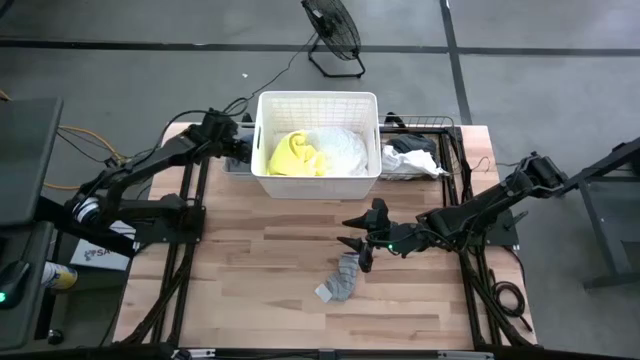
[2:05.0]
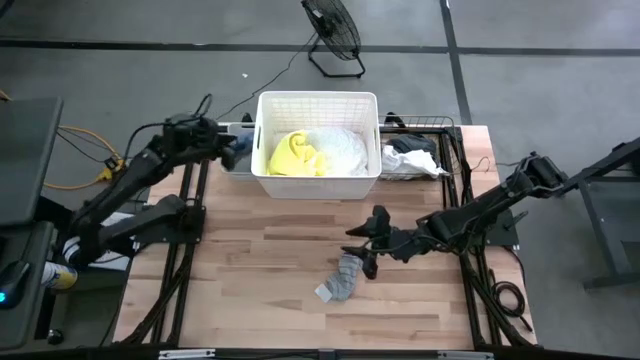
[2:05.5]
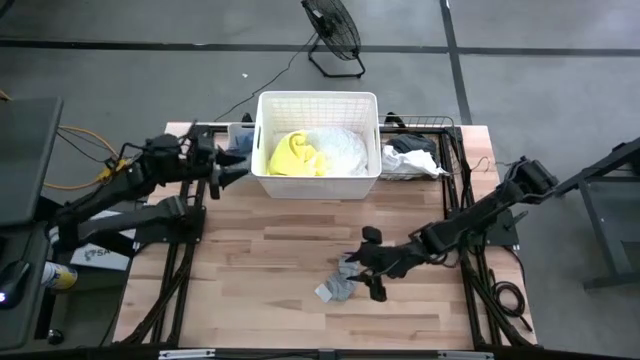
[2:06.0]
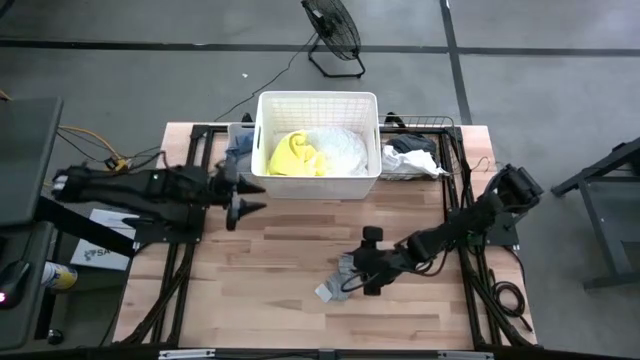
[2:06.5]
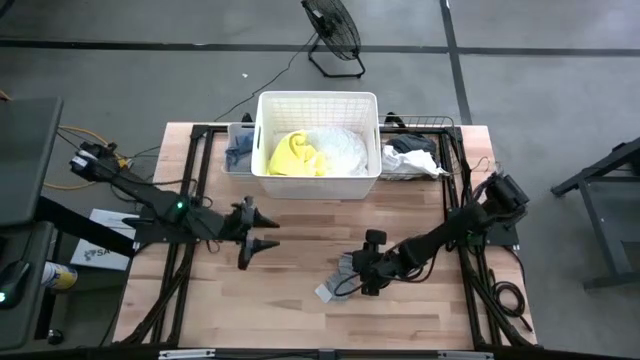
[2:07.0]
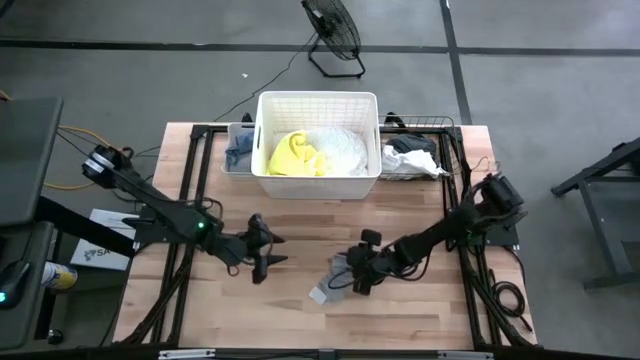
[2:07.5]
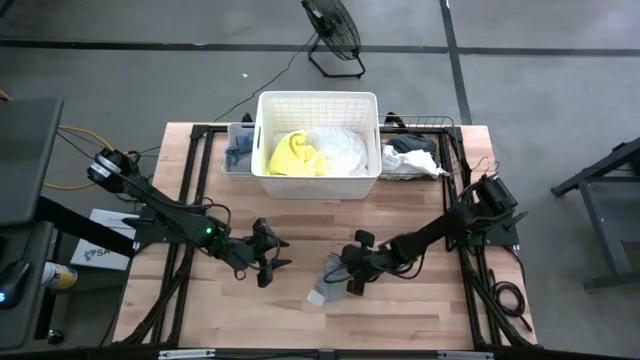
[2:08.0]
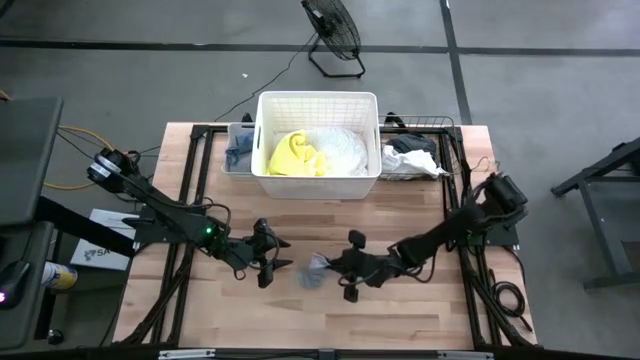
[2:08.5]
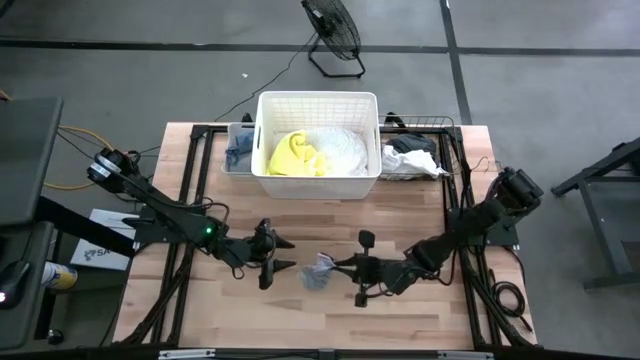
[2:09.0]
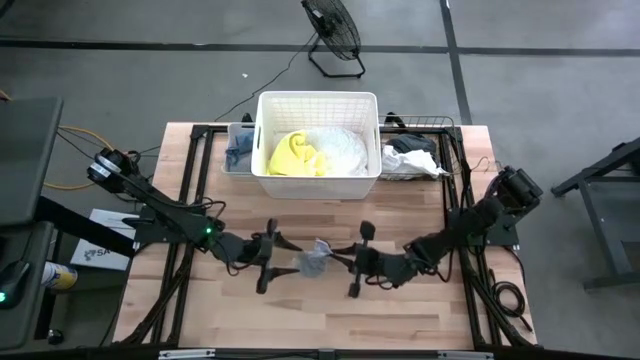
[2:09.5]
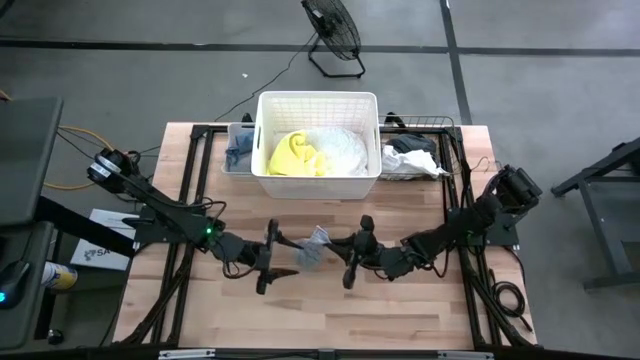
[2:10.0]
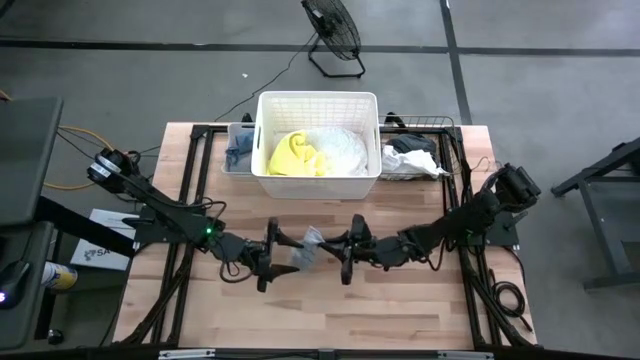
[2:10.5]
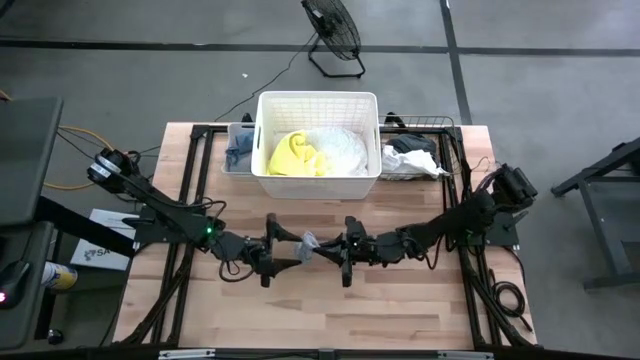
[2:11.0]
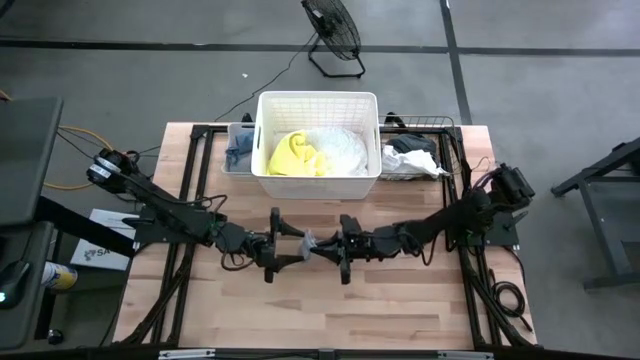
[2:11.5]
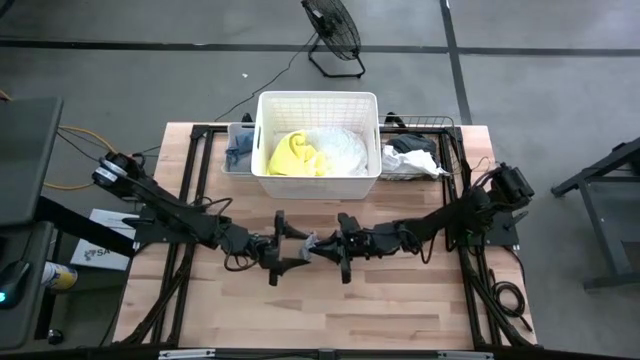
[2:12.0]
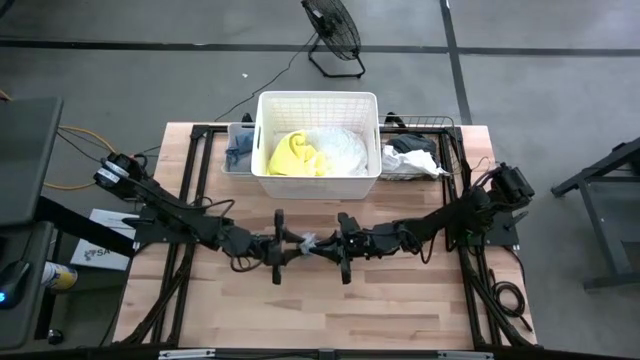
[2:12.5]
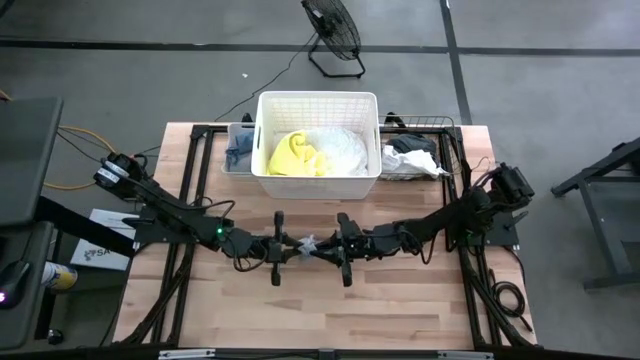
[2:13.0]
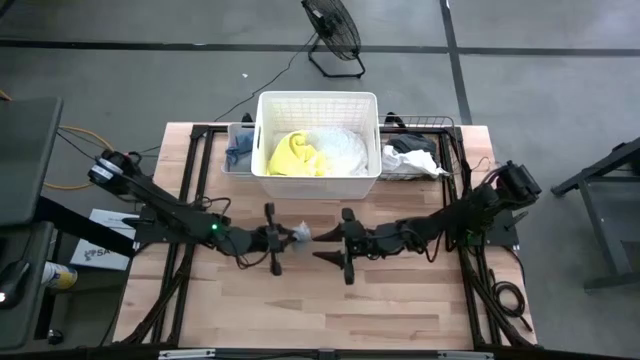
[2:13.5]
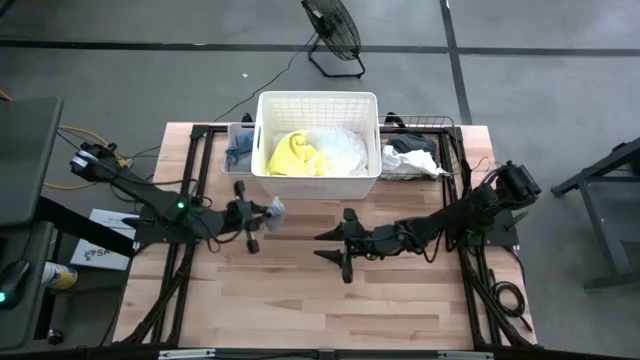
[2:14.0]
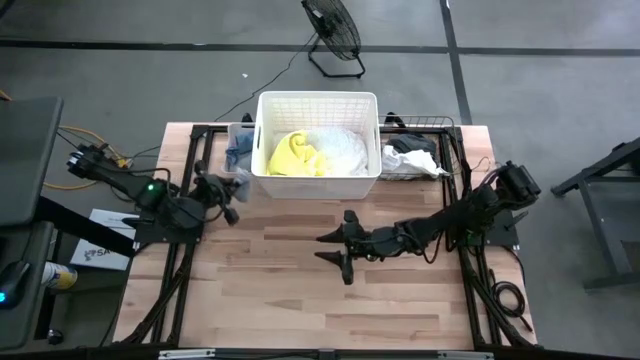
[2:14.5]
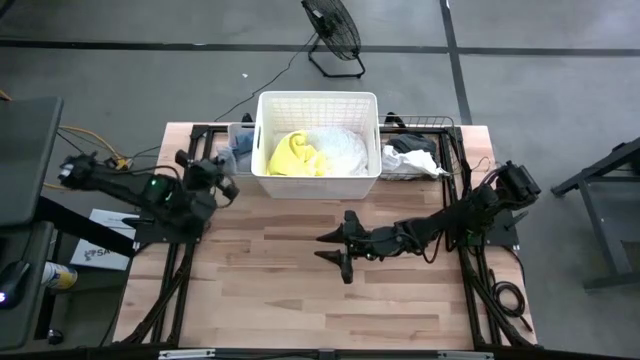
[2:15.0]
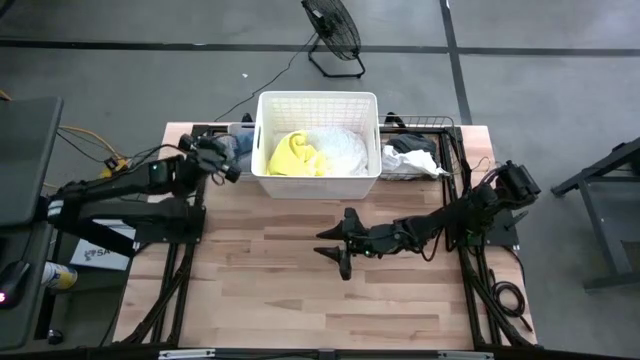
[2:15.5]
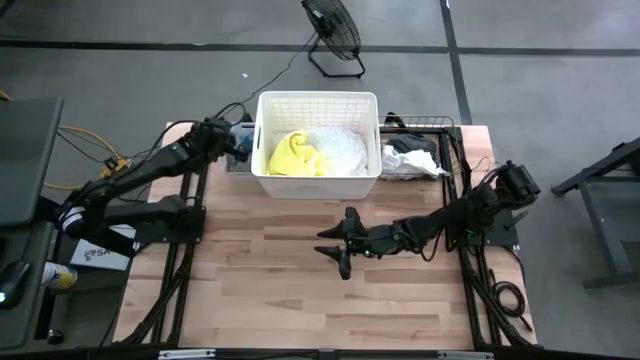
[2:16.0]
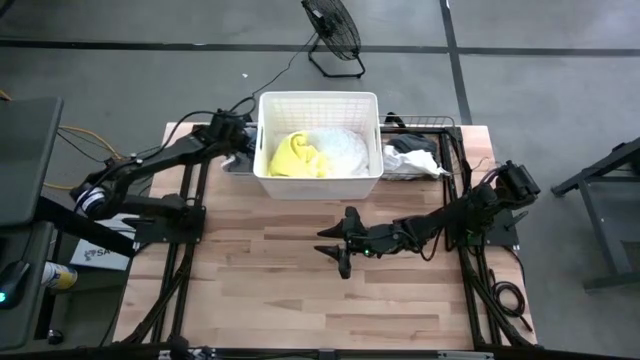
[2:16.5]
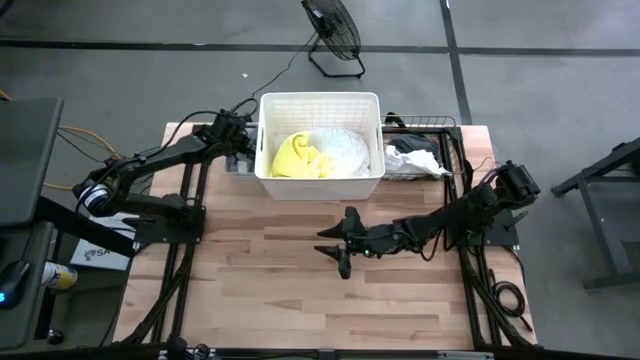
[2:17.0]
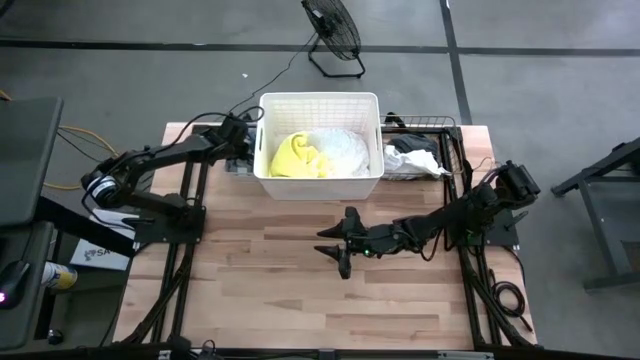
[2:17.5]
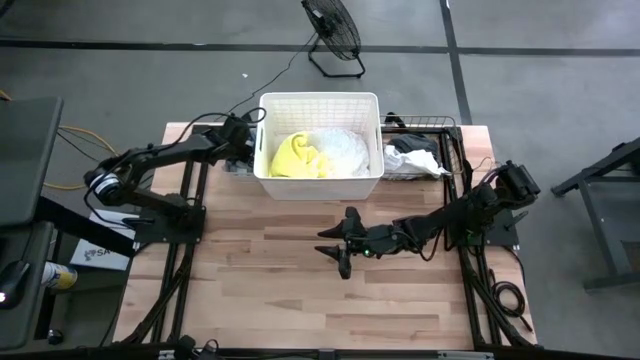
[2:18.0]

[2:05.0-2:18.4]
Task: Pick & Place Cloths
Put the gray sock into the white bin

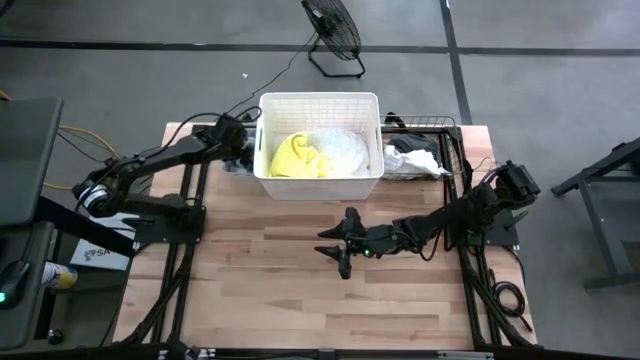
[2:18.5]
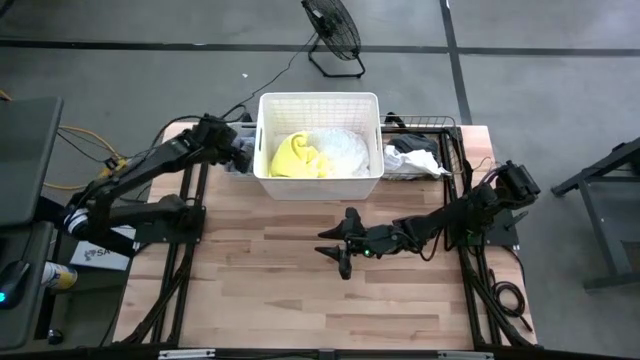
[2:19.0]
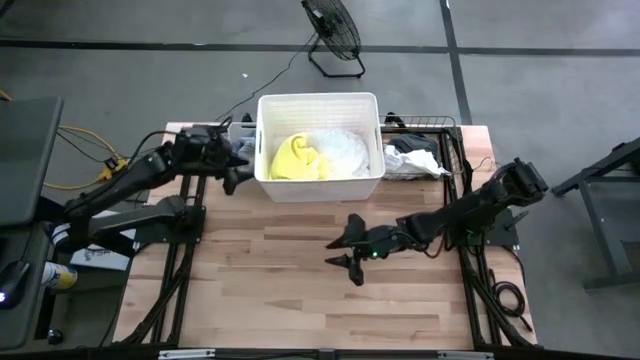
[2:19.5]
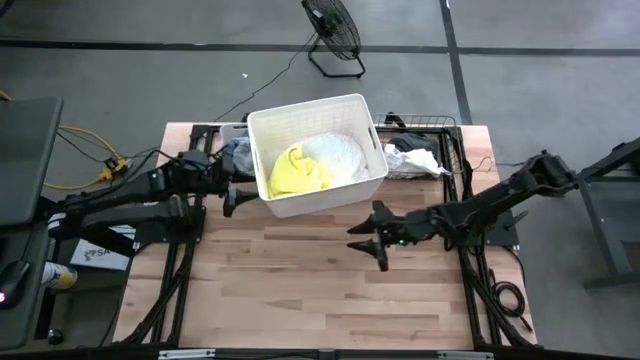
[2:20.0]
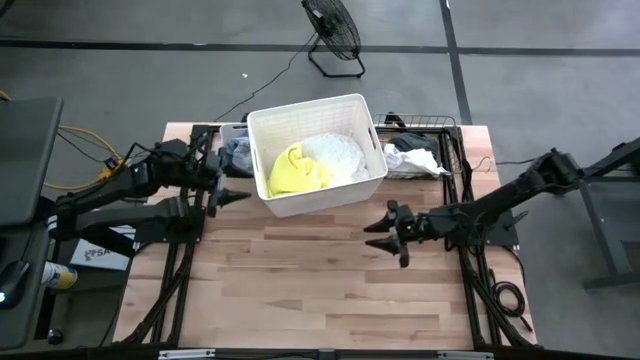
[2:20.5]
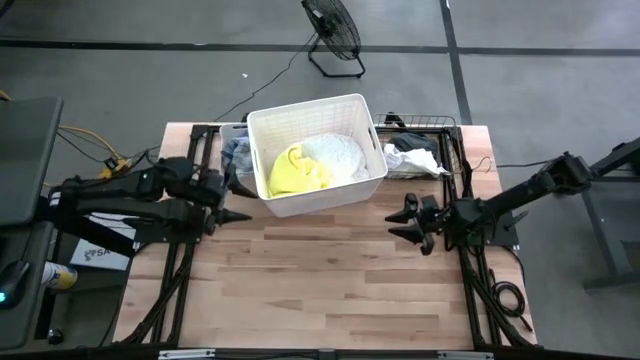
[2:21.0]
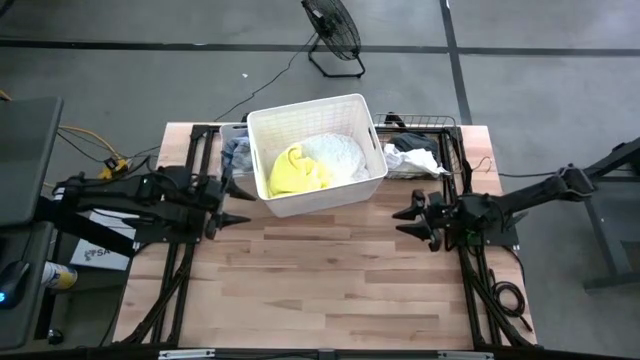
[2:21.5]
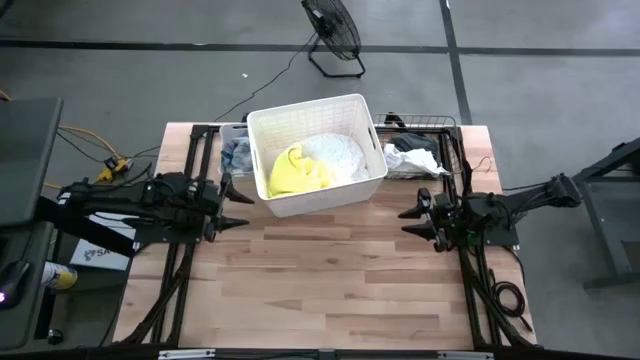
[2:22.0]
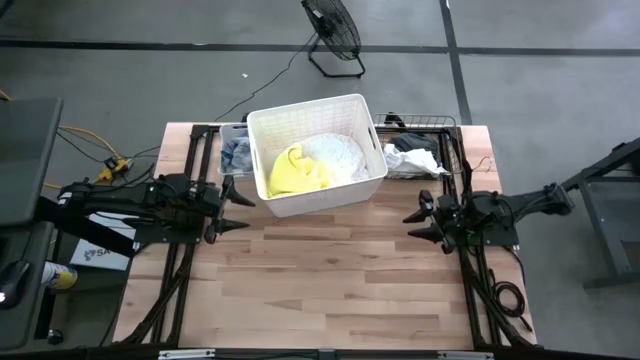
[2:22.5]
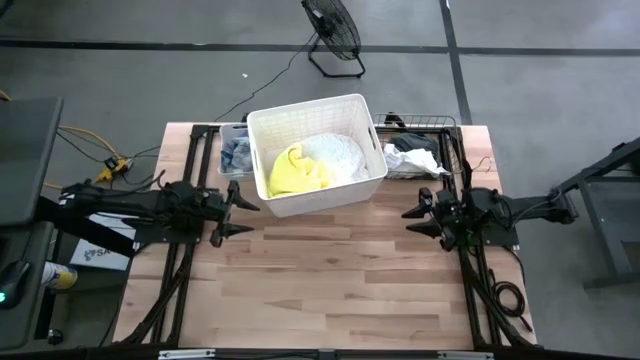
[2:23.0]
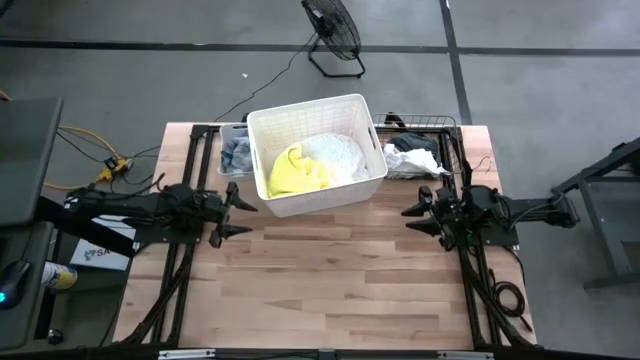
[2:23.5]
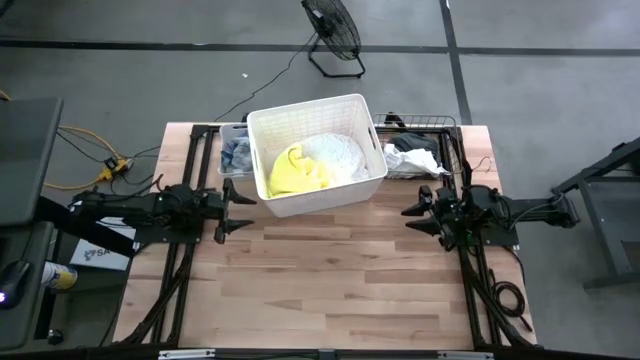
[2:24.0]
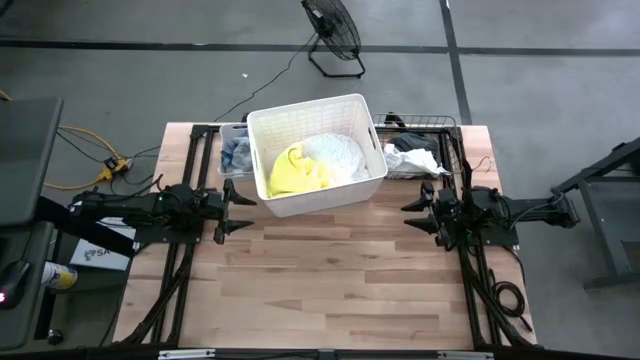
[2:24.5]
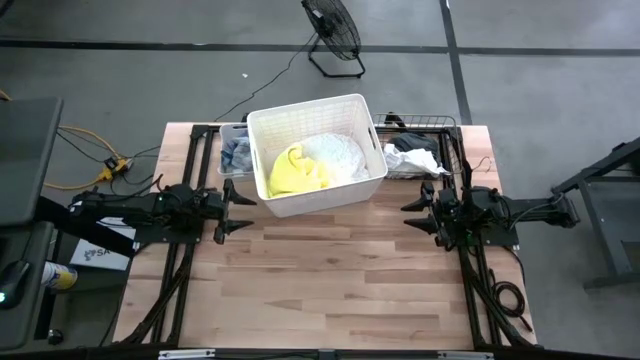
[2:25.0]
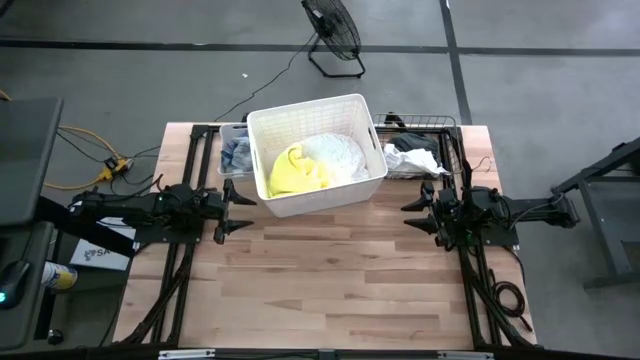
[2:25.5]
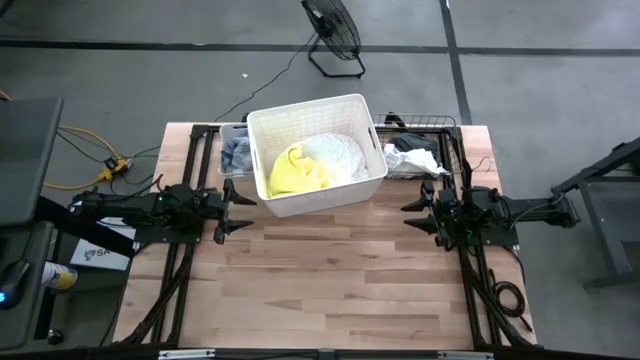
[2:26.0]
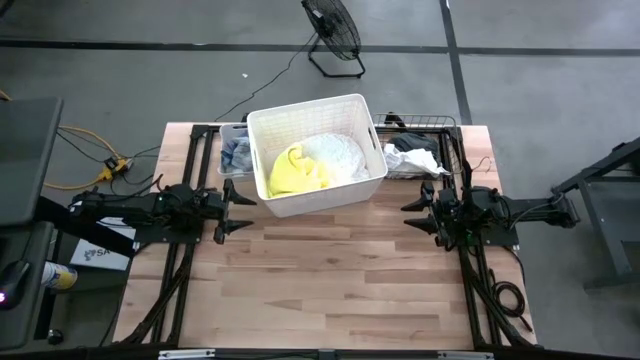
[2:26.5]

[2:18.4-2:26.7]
Return to Home Position
